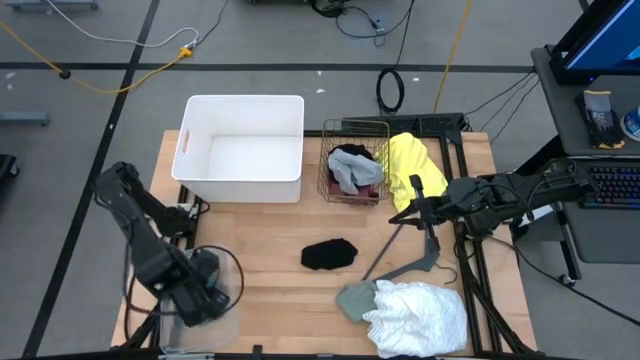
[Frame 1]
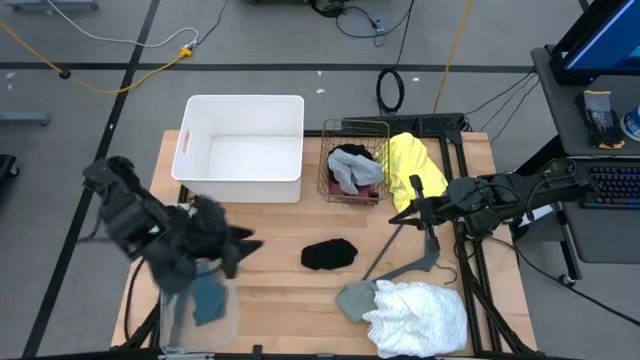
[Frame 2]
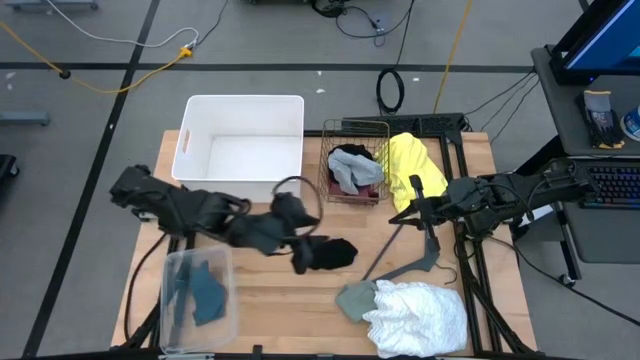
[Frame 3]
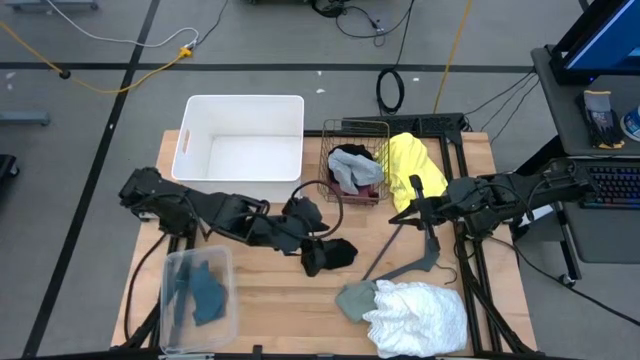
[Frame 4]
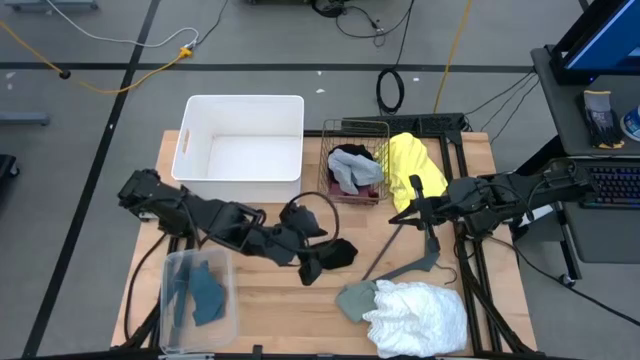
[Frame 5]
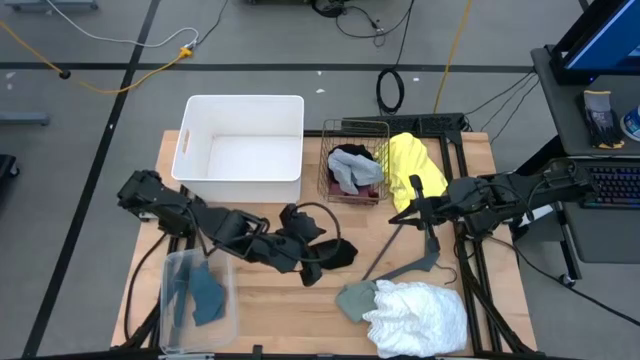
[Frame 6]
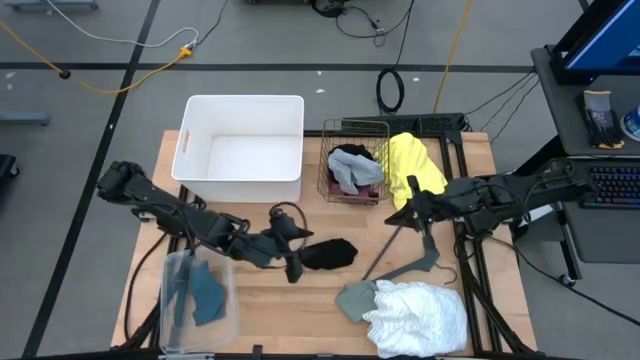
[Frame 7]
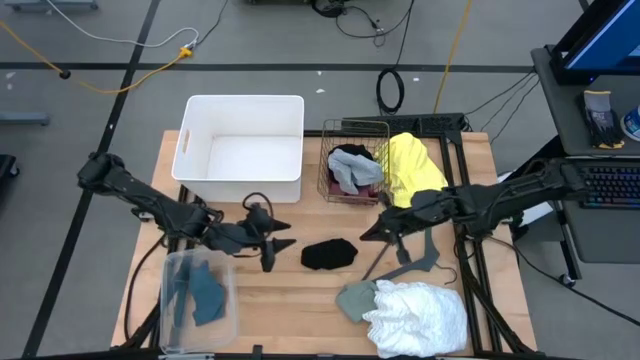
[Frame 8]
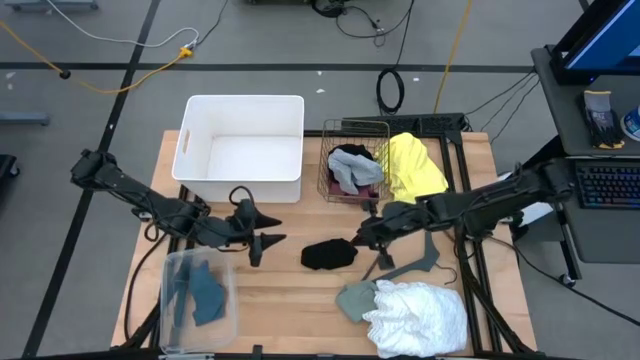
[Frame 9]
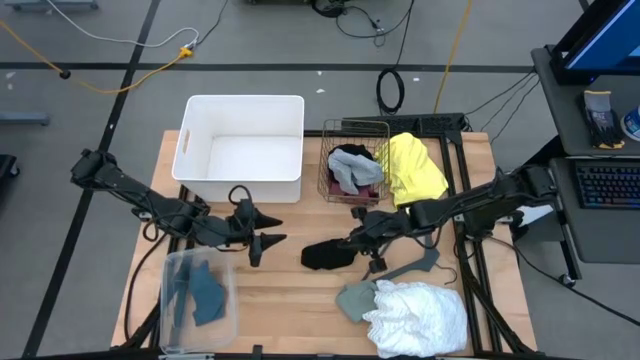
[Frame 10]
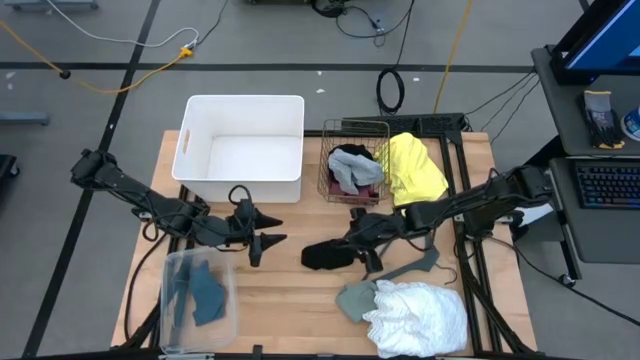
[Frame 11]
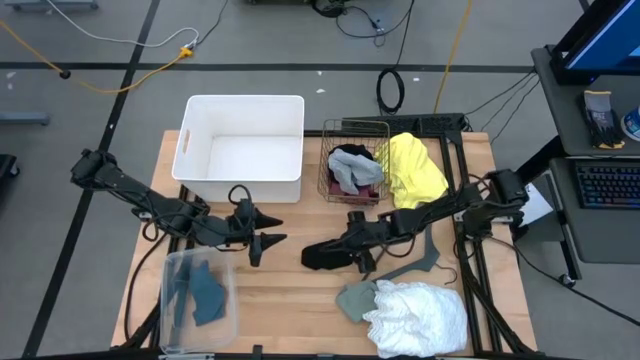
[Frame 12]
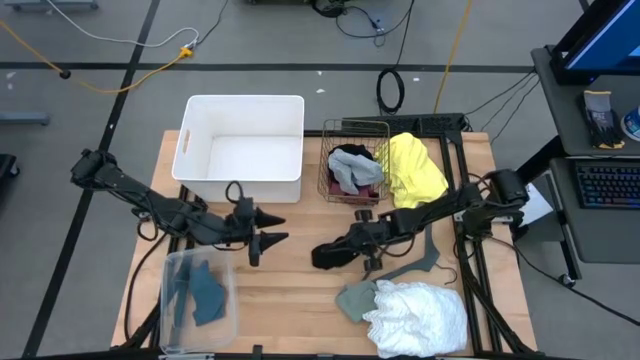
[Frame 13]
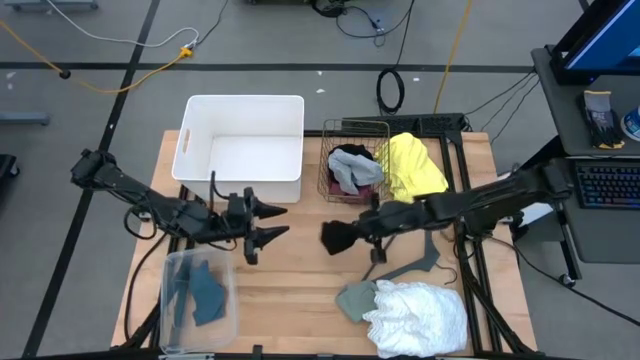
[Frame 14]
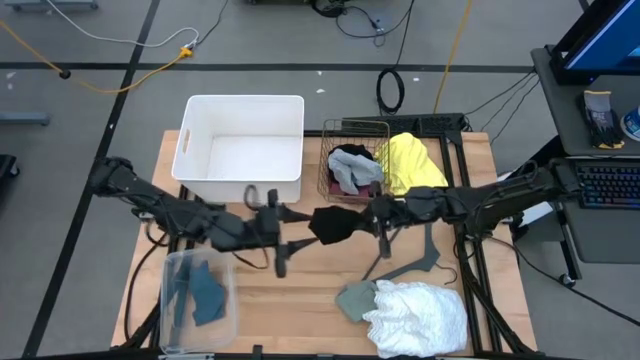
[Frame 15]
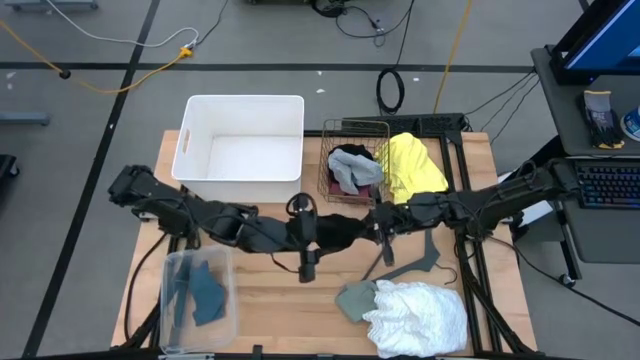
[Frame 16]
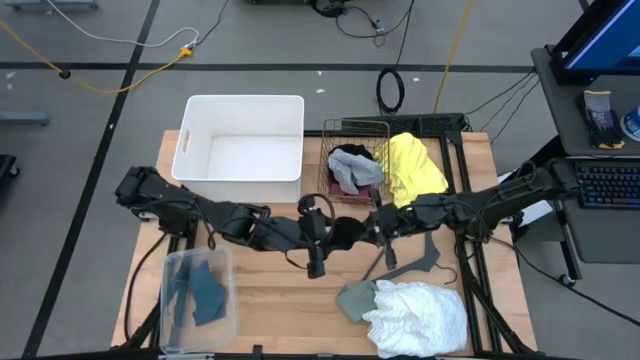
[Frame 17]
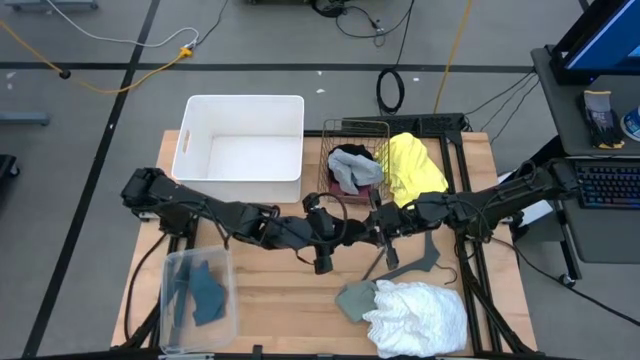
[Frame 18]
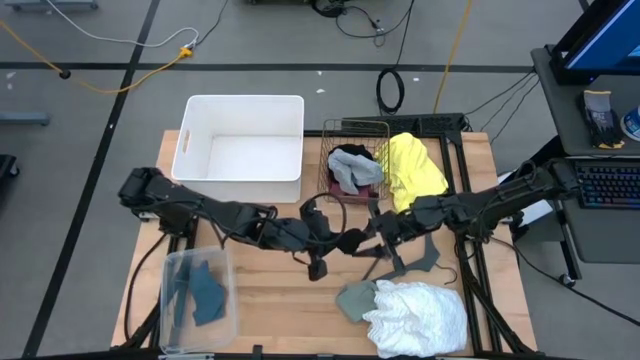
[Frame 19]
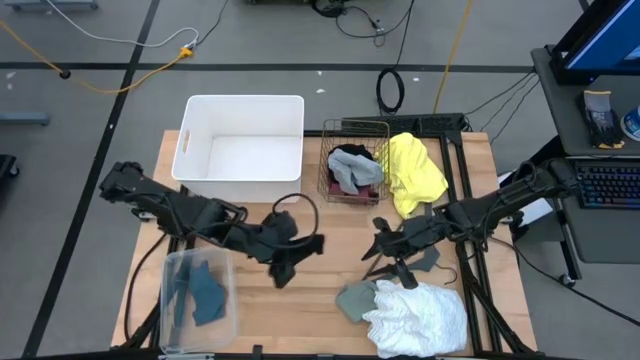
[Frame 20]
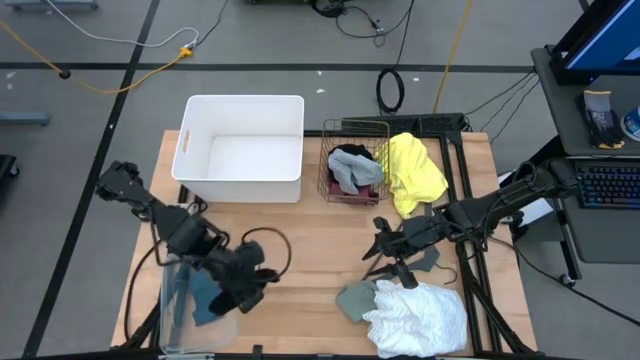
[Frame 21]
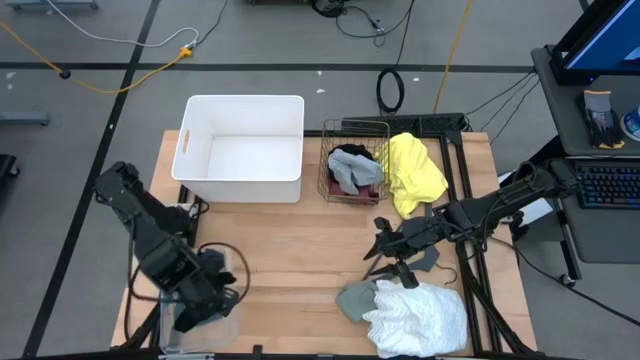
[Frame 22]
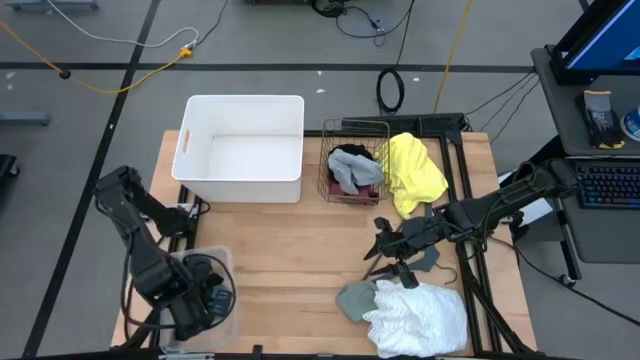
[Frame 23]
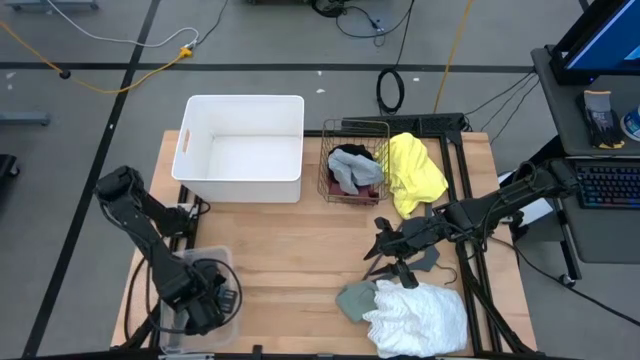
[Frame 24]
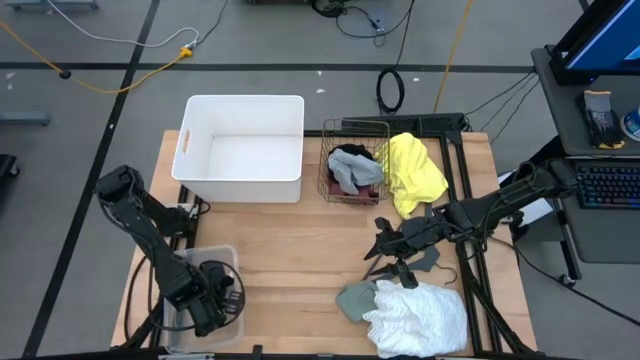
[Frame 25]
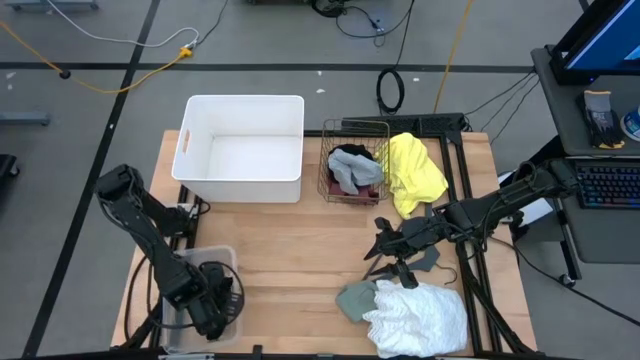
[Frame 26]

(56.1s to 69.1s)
Task: Pick & Place Cloths
Put the black sock into the transparent bin

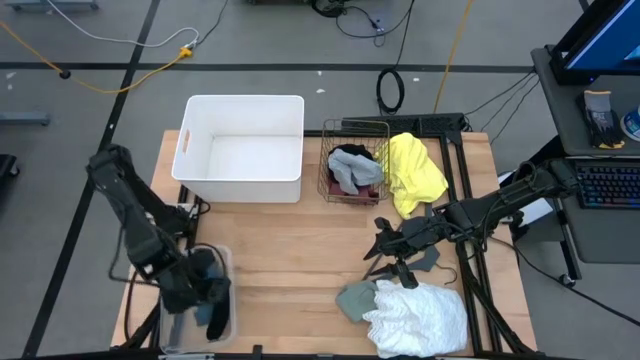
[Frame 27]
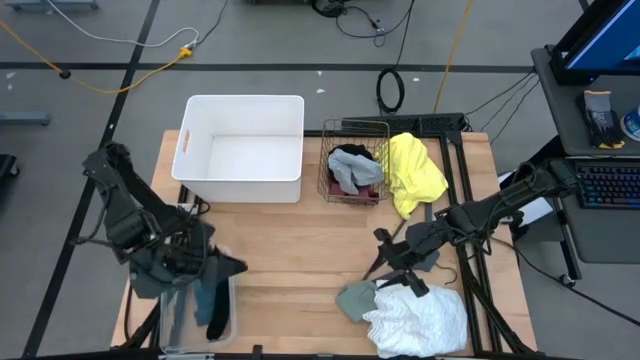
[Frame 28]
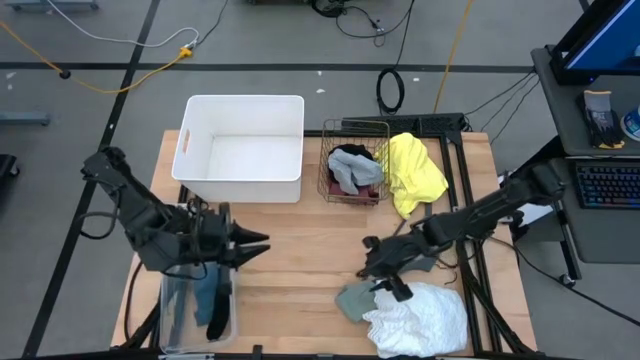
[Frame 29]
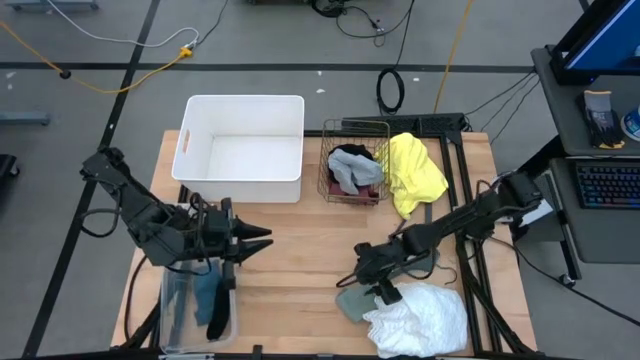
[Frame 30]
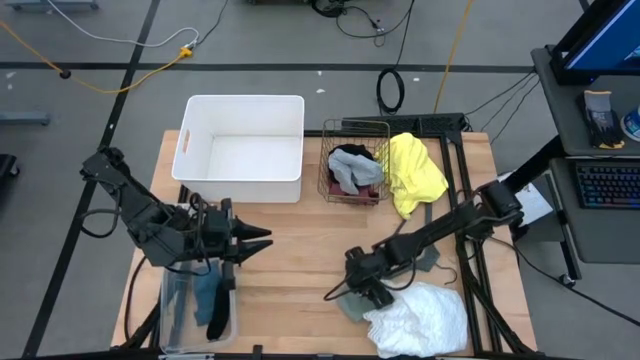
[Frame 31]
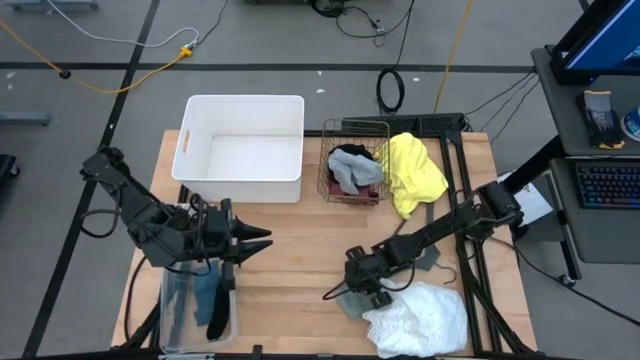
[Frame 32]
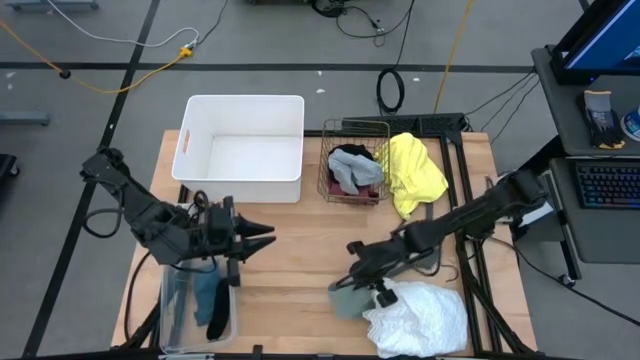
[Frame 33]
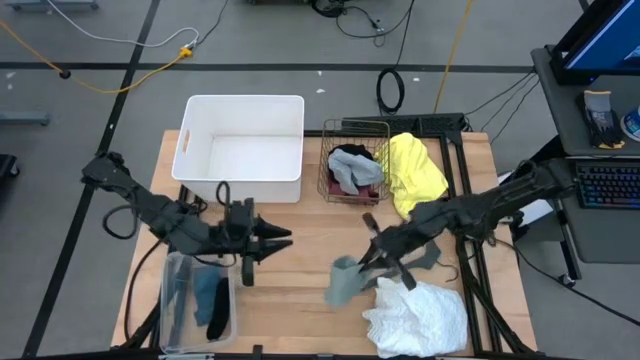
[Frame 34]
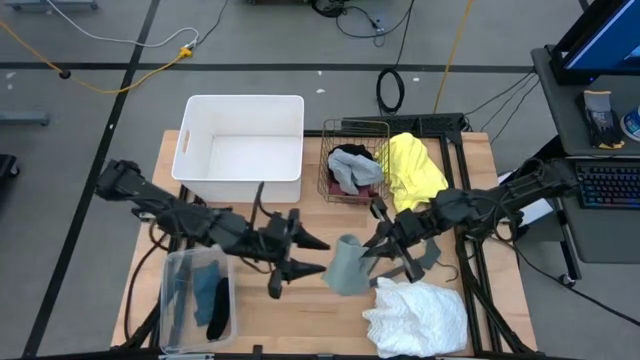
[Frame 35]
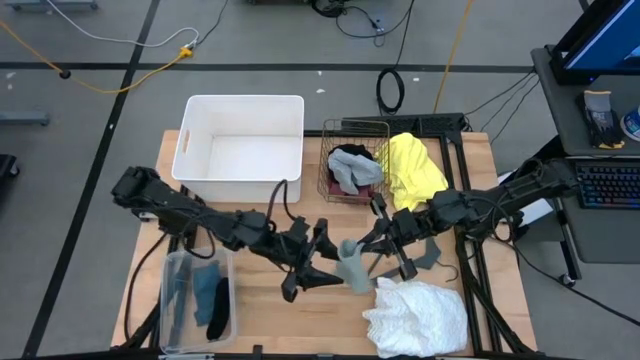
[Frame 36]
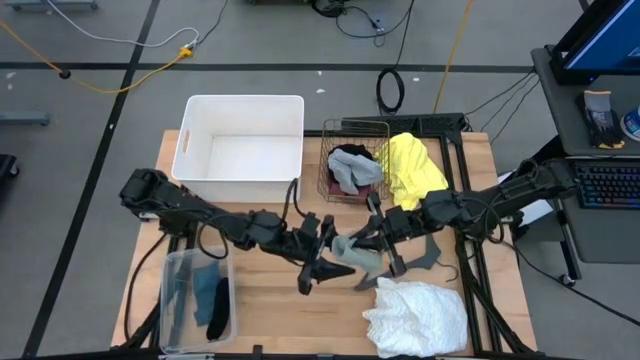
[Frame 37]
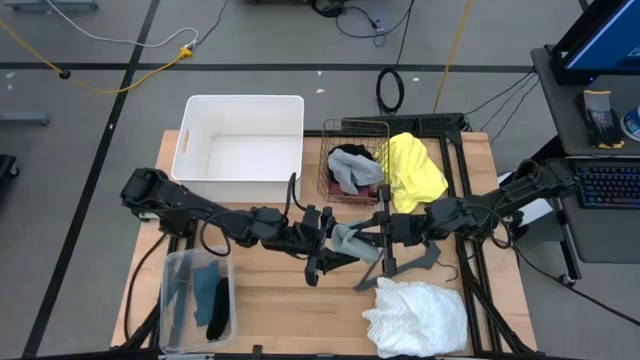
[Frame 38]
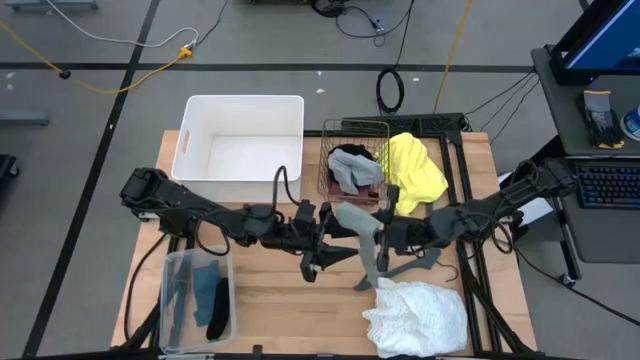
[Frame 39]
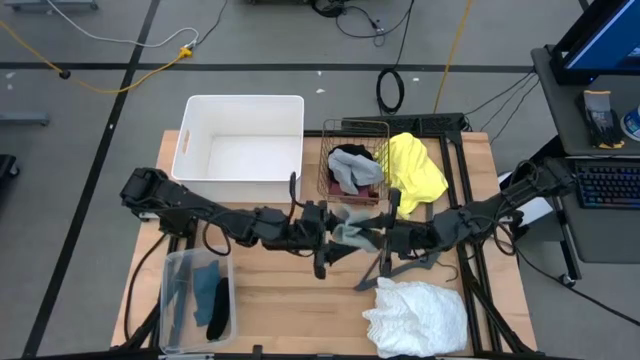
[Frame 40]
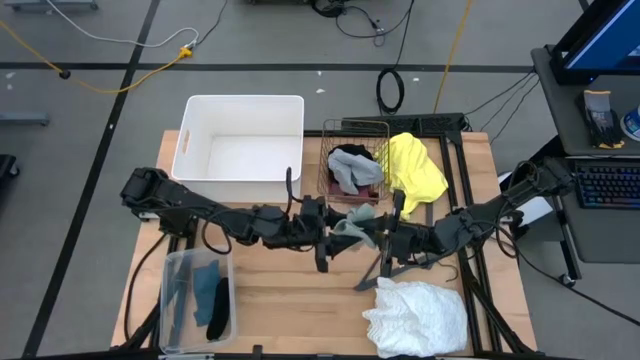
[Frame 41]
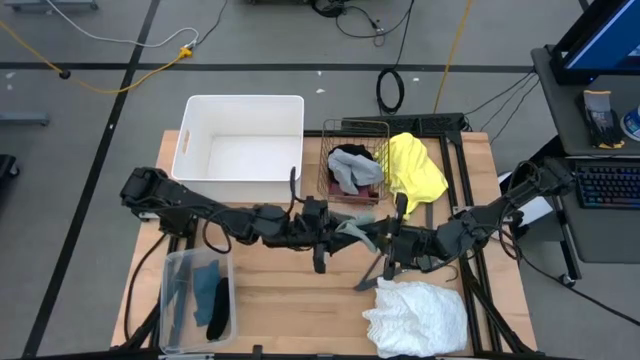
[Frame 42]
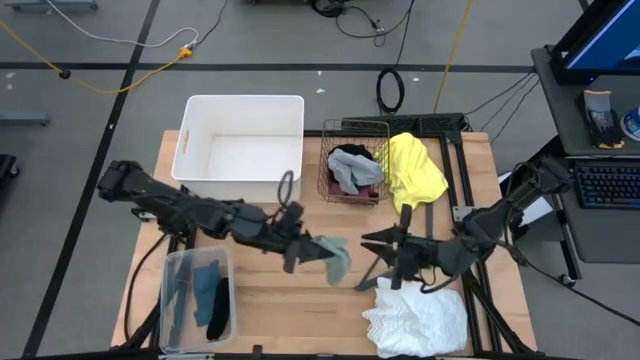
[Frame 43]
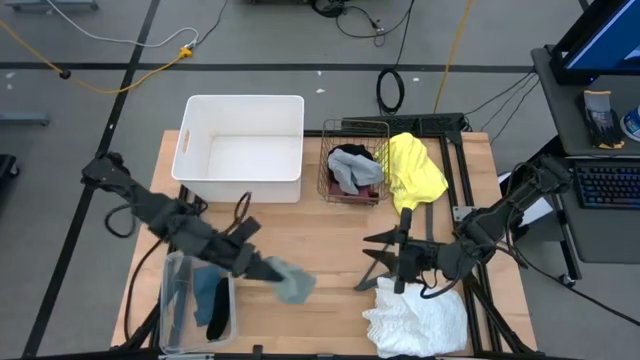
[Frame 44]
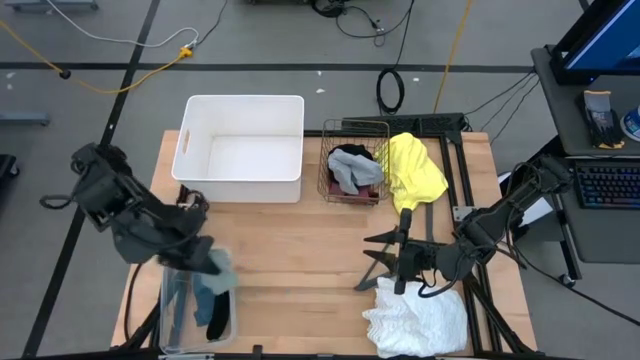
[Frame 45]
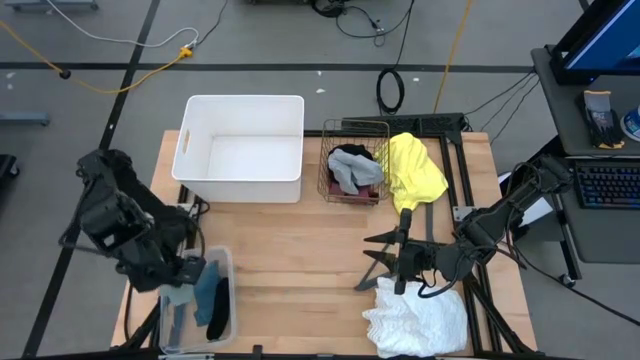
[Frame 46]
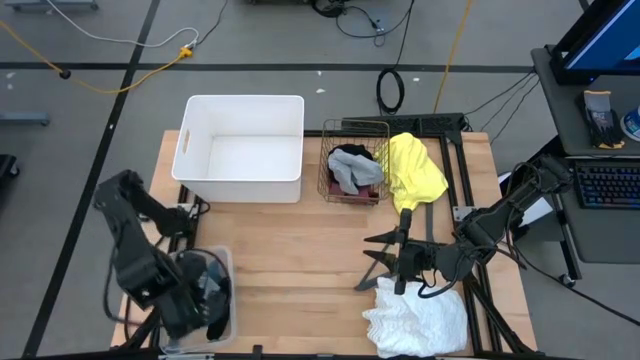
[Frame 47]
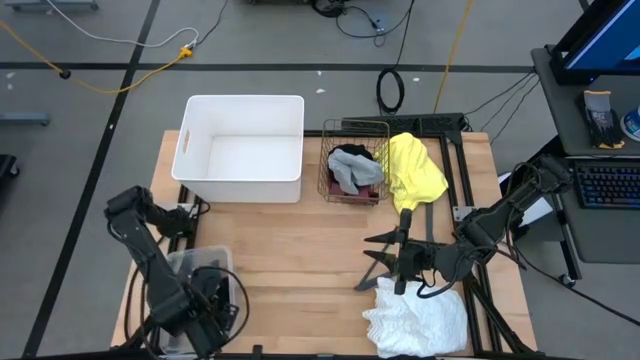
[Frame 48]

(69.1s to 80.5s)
Put the gray sock into the transparent bin
